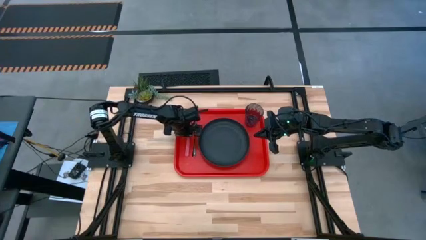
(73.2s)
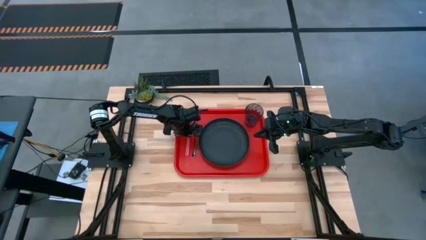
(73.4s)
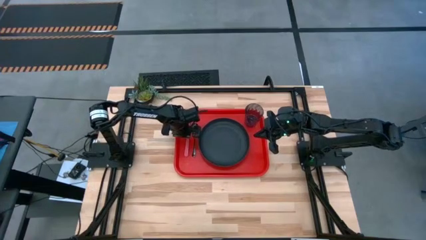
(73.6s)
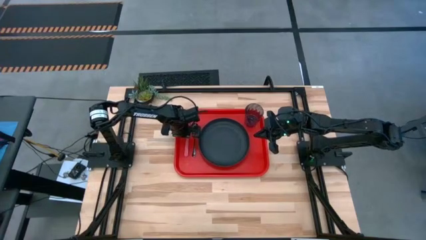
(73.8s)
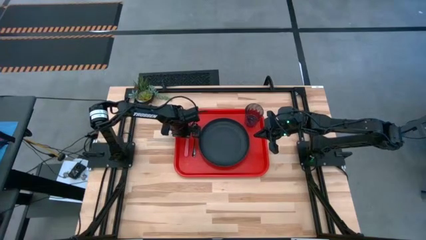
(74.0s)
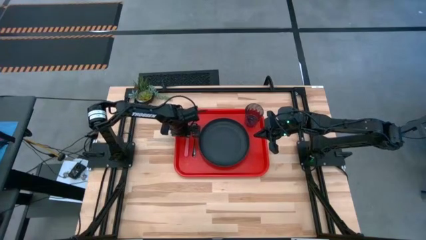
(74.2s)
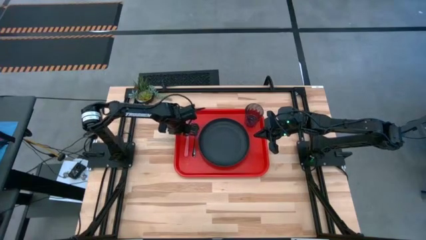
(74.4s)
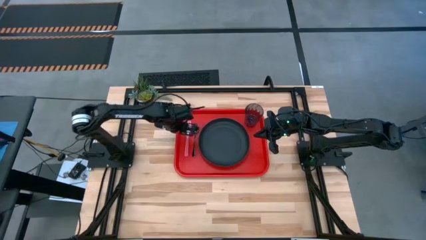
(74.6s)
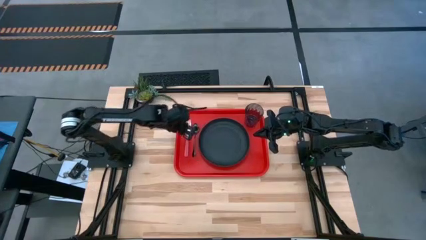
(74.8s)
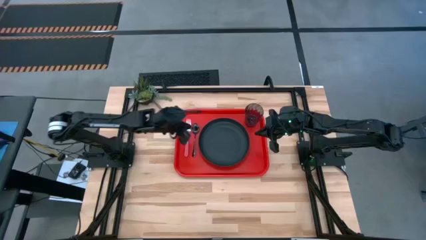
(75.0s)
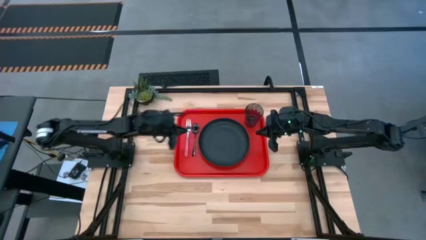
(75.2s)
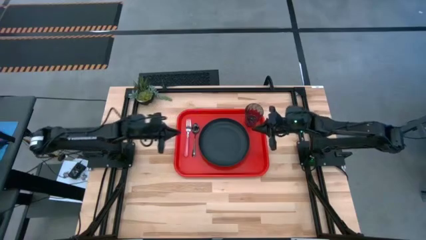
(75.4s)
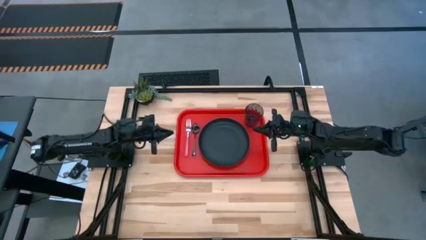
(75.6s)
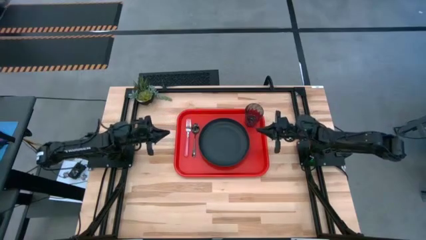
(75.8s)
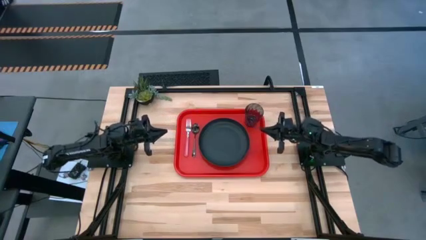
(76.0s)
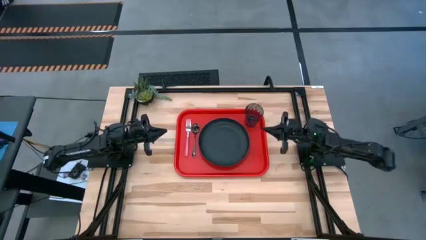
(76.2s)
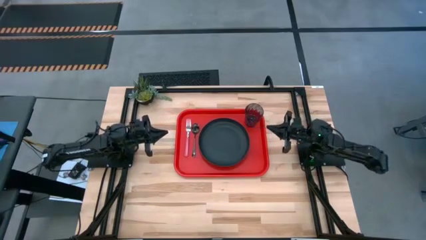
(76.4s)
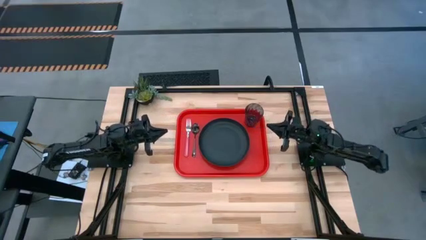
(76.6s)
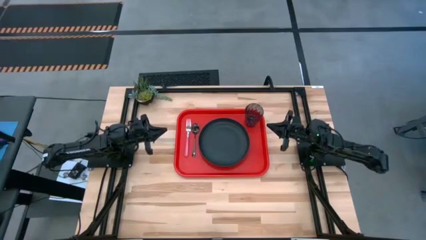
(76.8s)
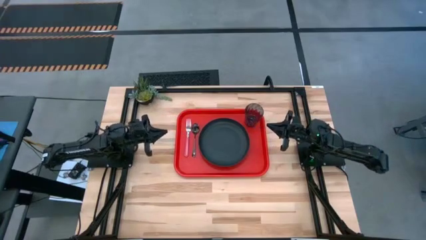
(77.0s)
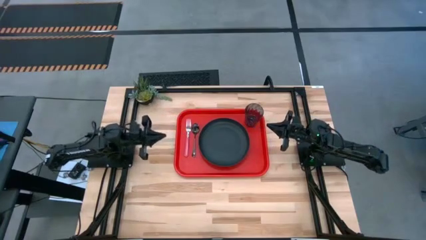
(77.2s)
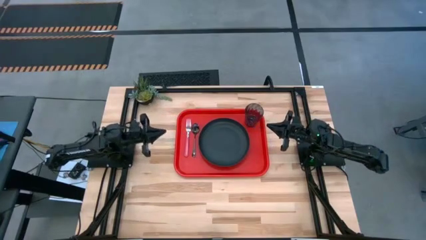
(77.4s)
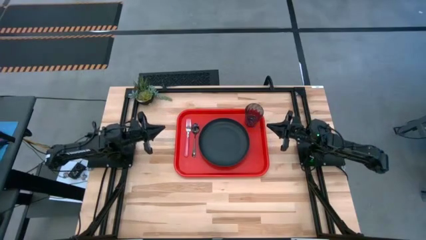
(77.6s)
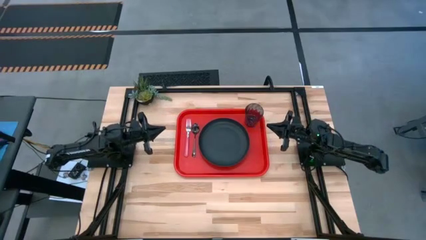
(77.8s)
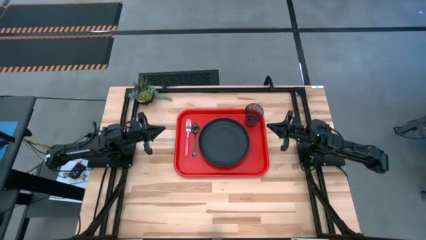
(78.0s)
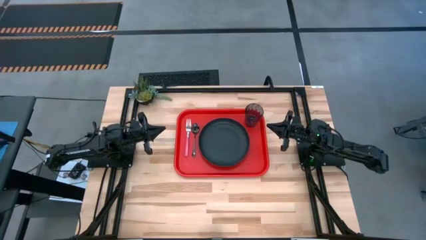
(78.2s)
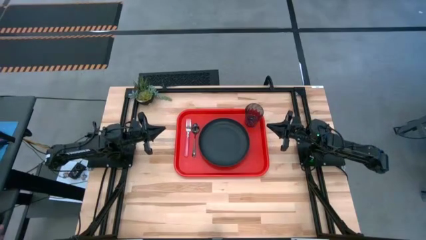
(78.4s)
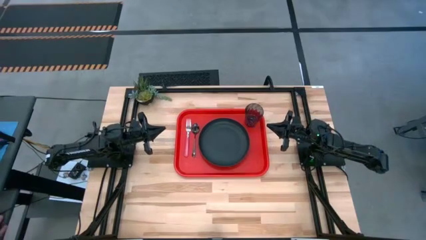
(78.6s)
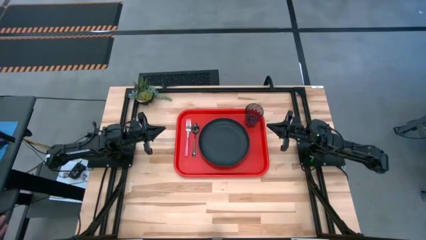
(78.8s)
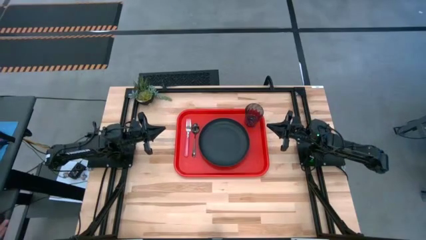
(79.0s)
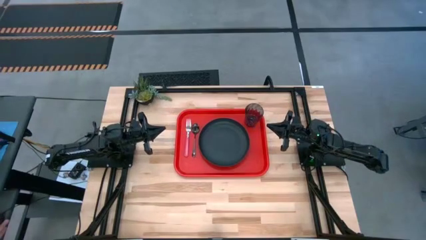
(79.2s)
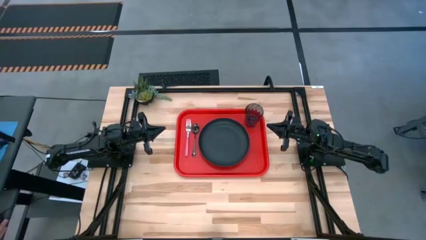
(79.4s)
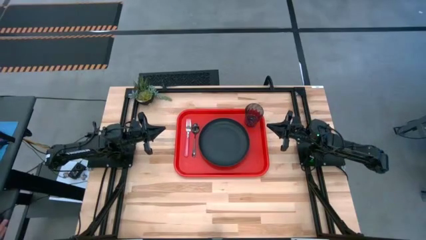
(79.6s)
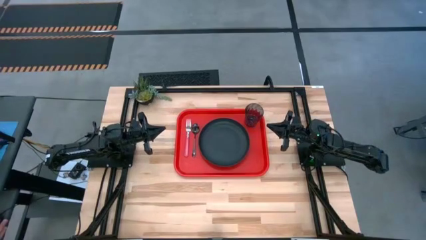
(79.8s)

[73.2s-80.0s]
Task: Pick and place plate/cup/fork/spoon on tray
Return to Home Position

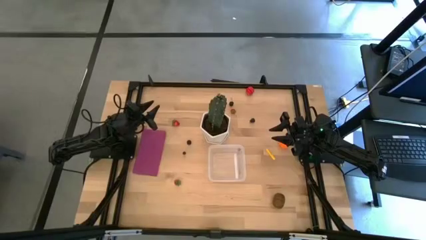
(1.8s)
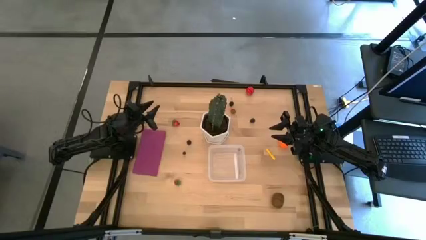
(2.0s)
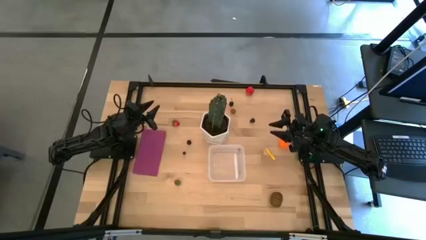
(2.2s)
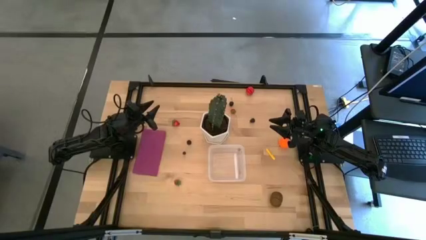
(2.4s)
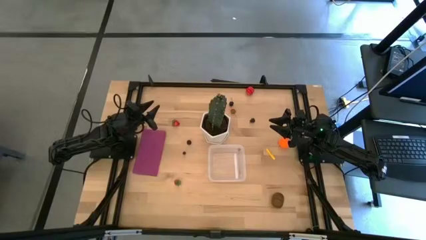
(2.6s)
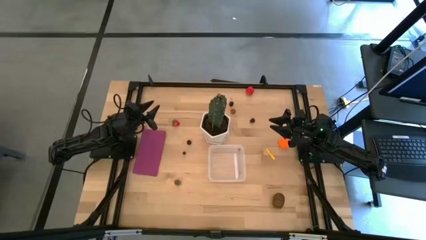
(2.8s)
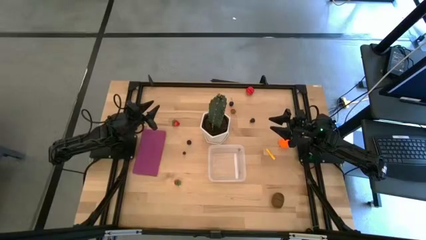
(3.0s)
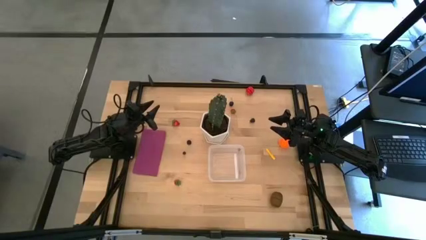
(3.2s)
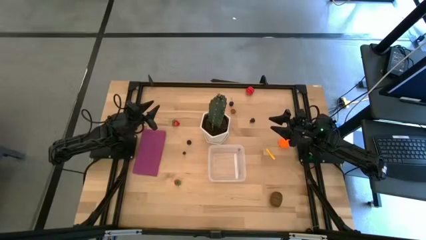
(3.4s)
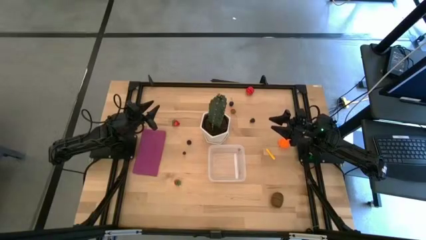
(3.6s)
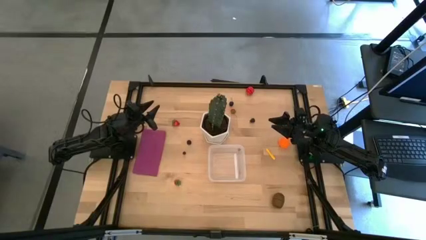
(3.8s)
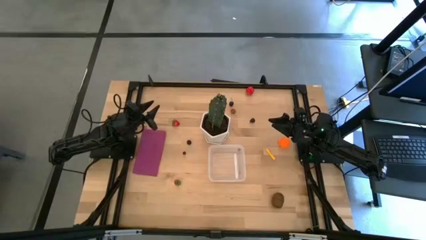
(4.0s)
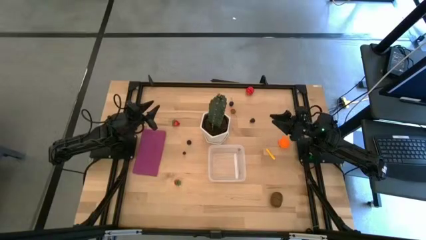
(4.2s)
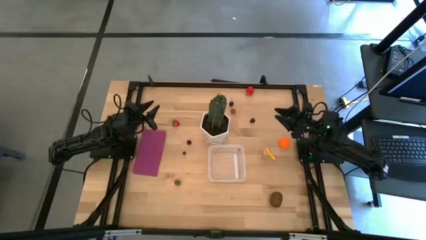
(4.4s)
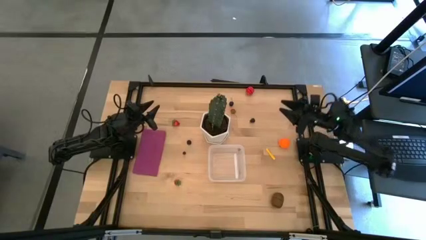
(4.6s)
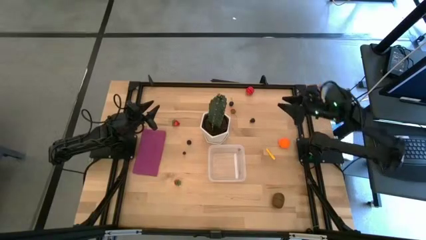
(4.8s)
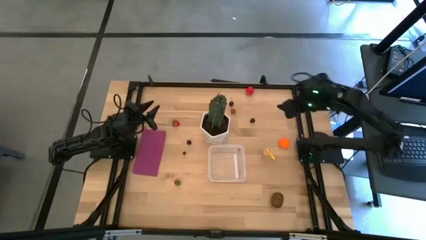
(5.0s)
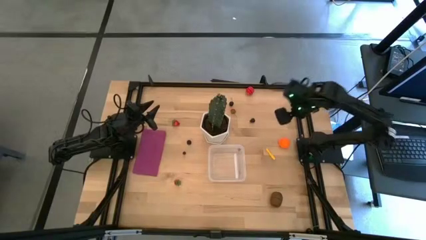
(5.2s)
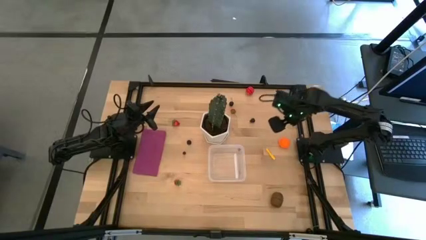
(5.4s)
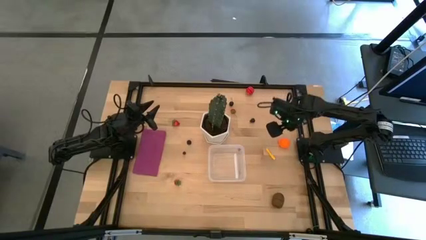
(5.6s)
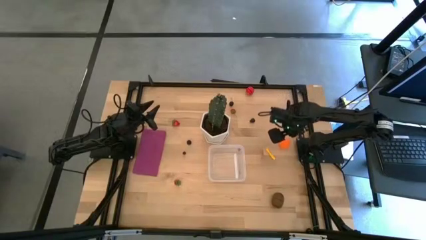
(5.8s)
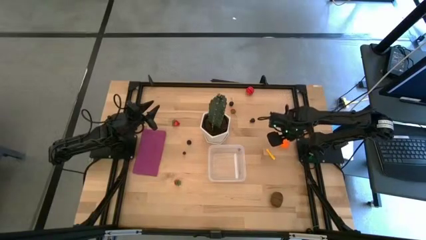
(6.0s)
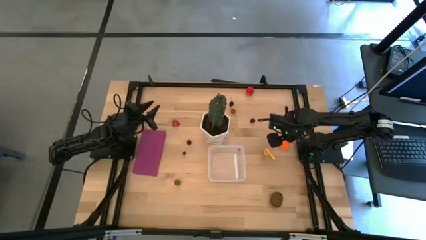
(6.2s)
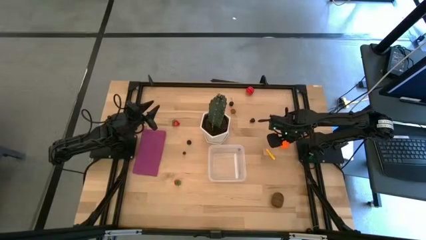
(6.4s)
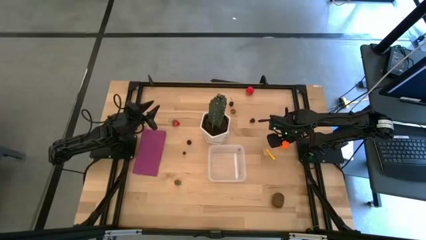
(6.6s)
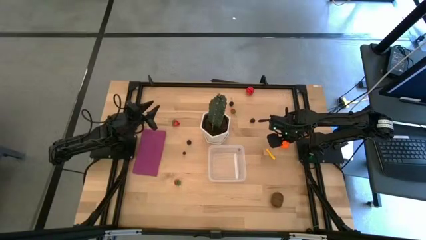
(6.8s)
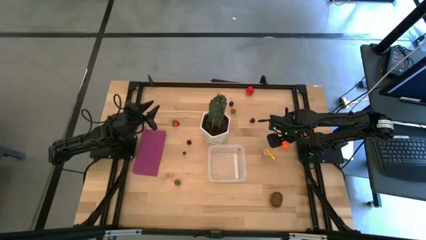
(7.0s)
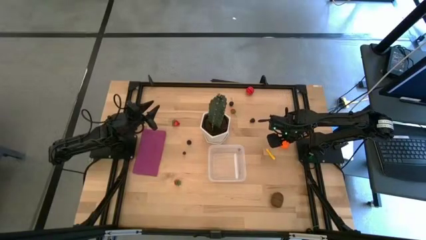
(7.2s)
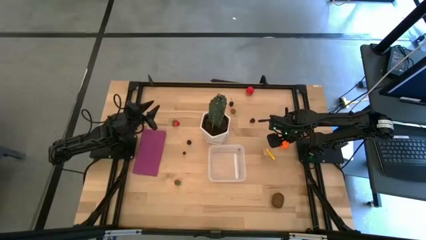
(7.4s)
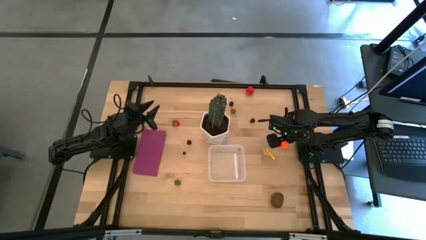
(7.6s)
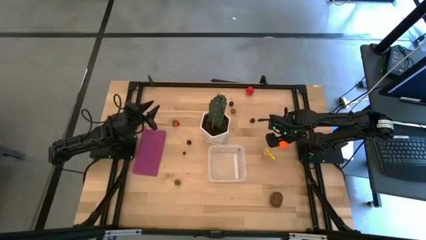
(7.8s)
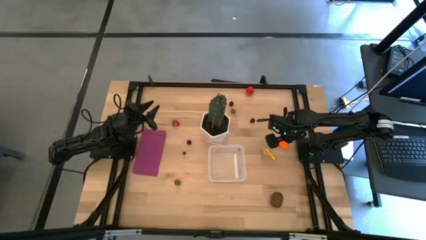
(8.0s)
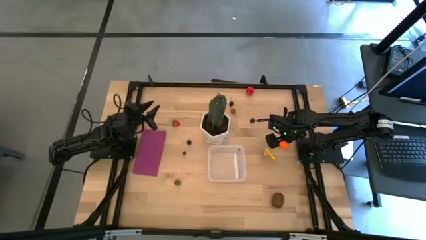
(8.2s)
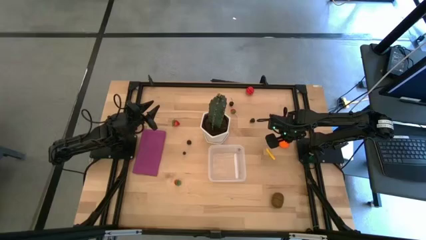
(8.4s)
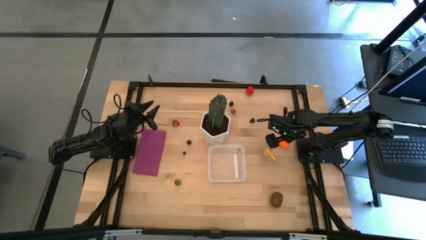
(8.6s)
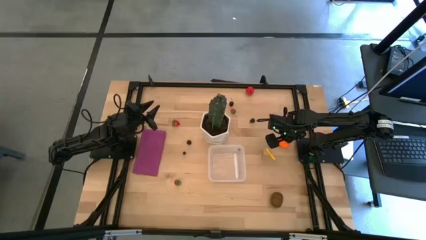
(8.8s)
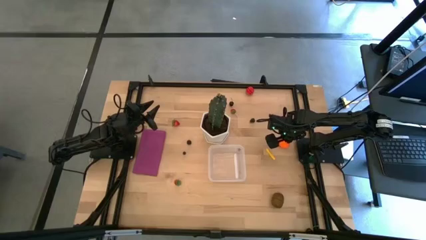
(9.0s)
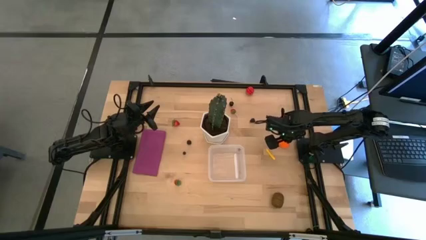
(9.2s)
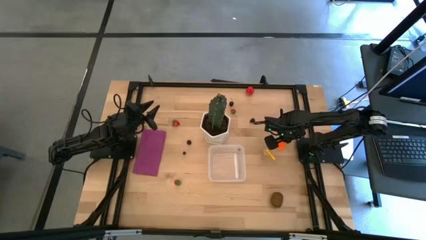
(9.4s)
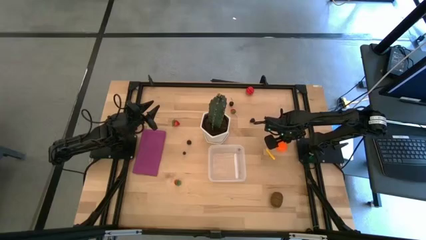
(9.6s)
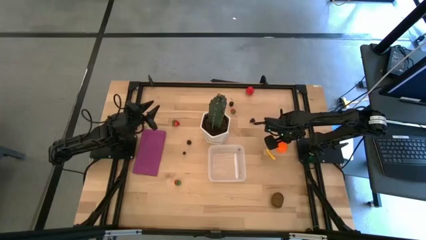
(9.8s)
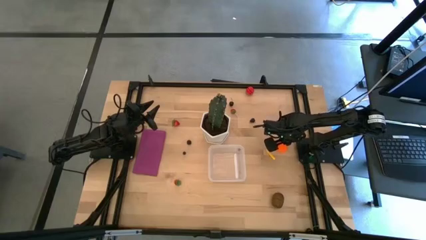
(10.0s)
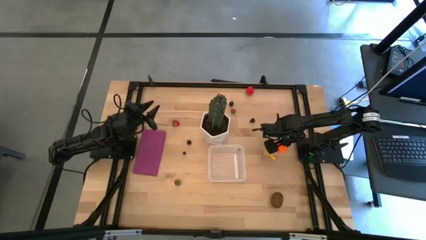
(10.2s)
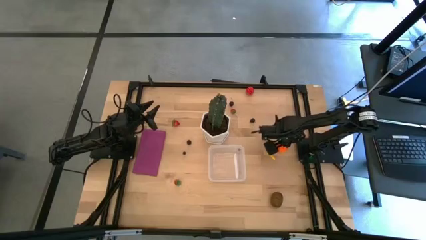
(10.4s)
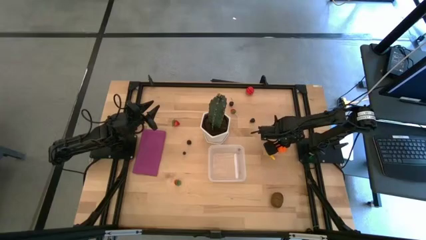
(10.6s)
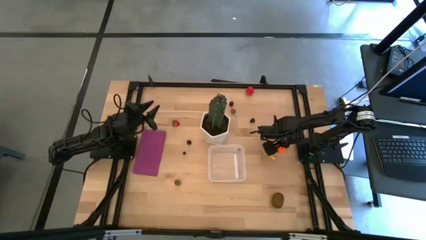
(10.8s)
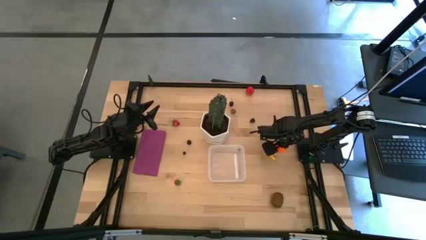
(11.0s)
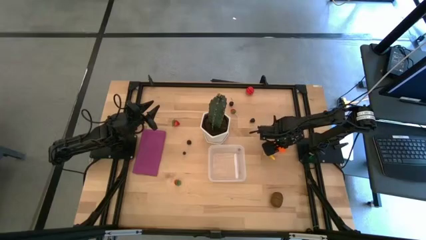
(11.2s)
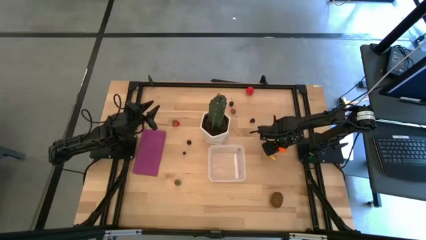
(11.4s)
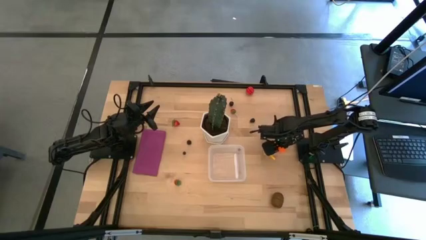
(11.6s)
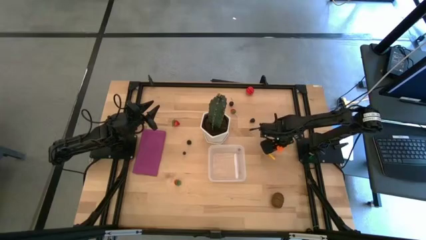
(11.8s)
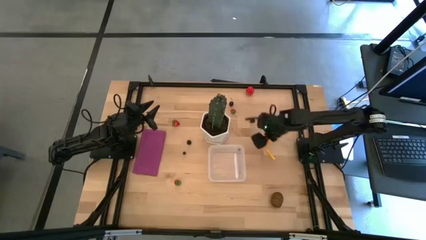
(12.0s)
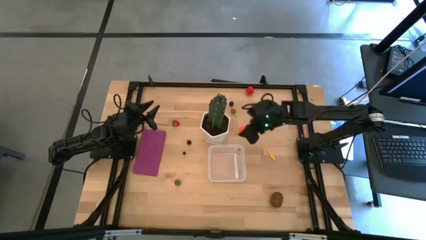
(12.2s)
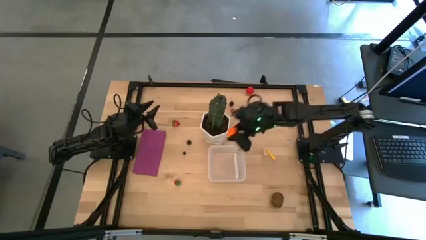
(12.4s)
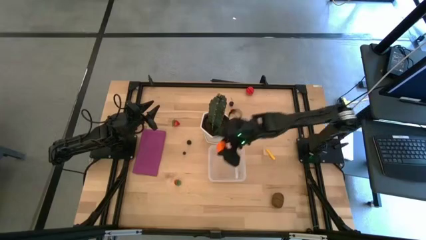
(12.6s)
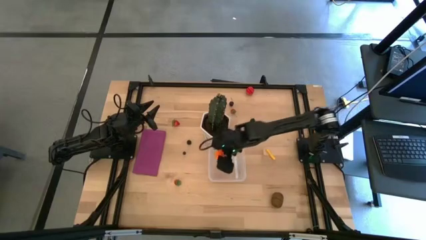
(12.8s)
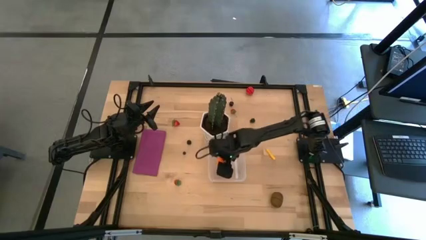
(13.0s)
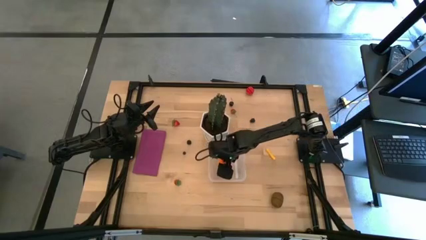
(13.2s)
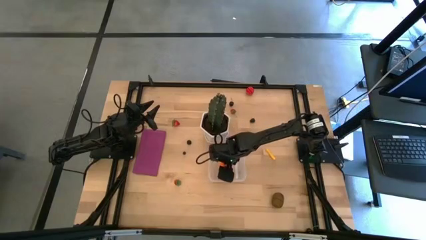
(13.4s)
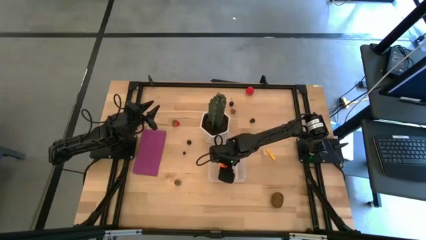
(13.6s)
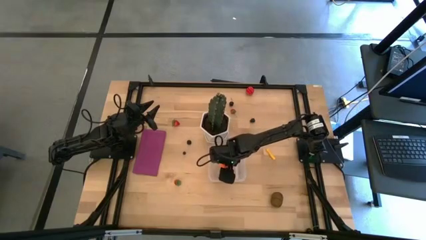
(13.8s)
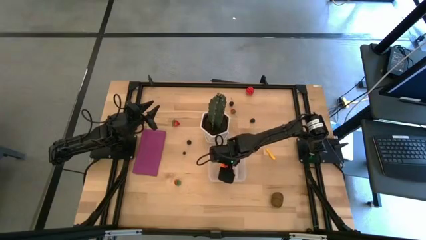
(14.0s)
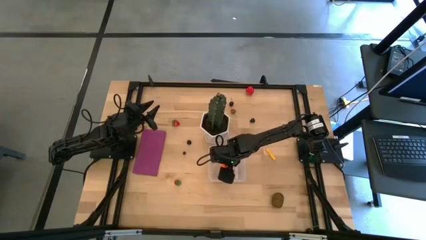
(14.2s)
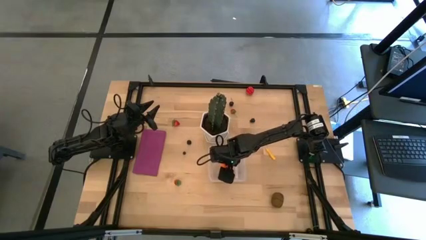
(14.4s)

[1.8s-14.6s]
Task: Pick and placing Produce into tupperware
Put the orange pumpkin into the transparent bin
